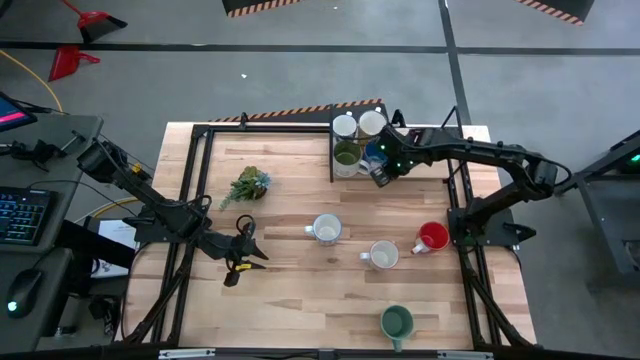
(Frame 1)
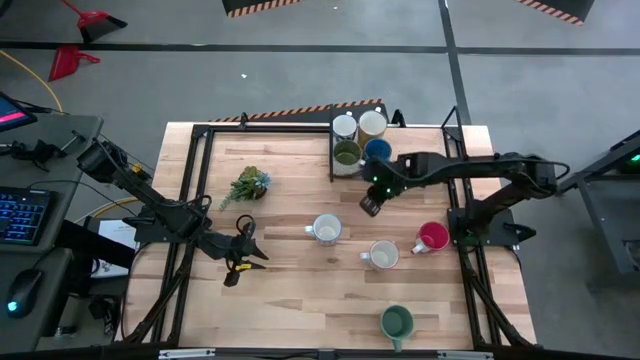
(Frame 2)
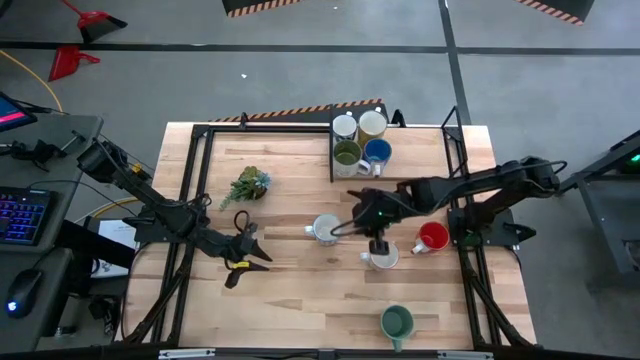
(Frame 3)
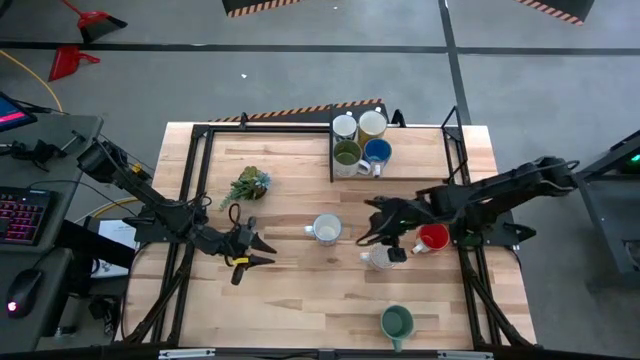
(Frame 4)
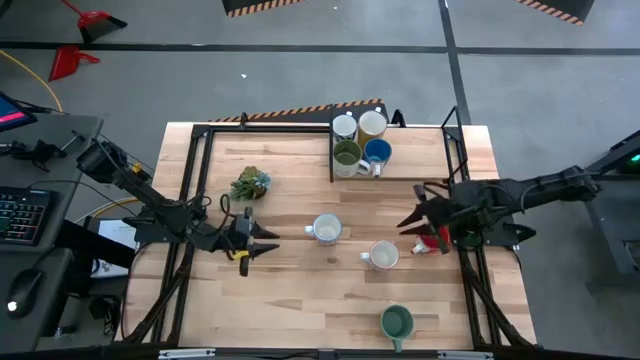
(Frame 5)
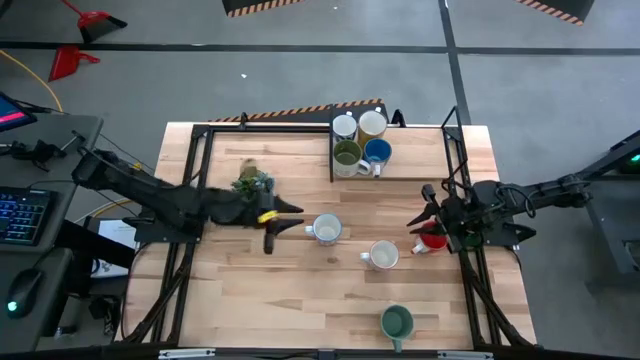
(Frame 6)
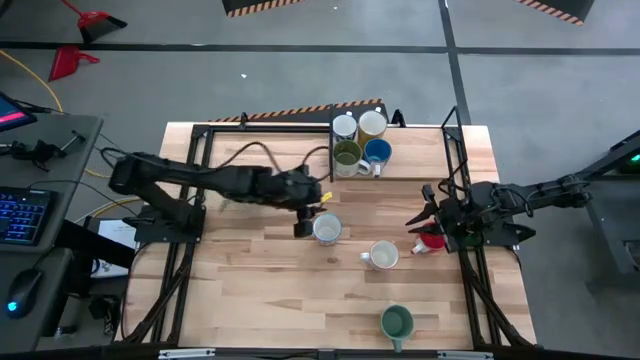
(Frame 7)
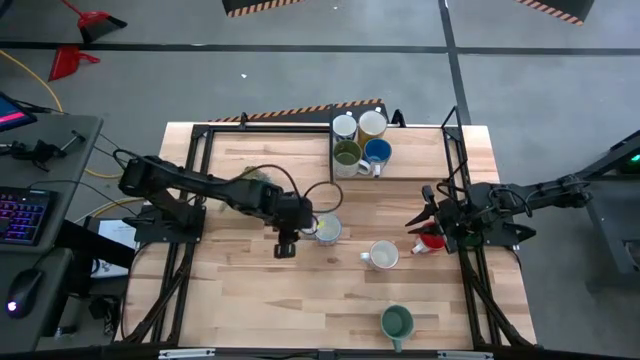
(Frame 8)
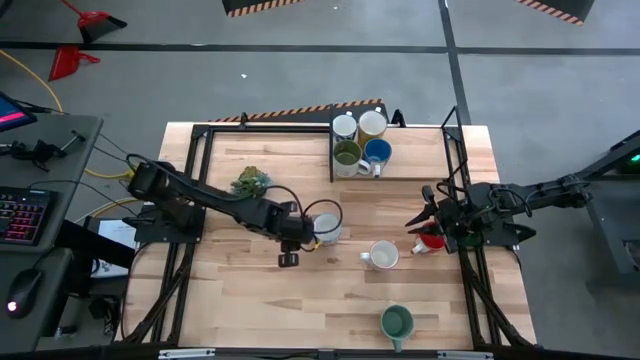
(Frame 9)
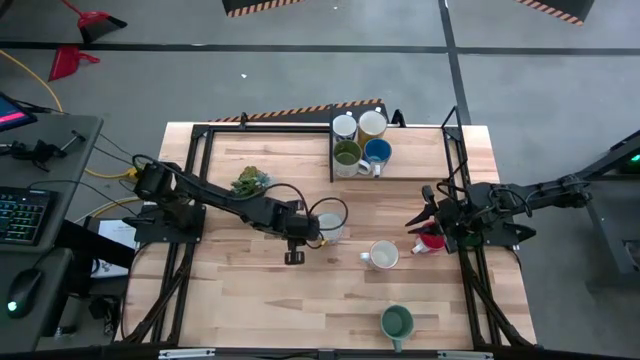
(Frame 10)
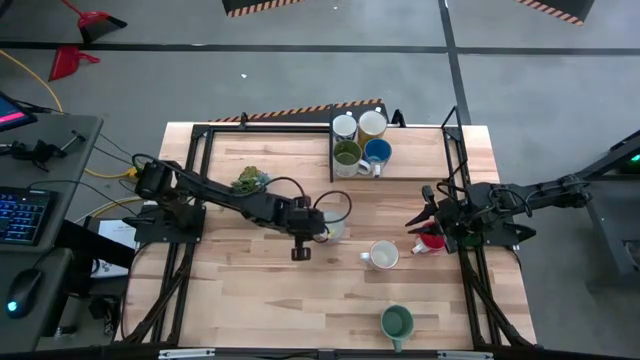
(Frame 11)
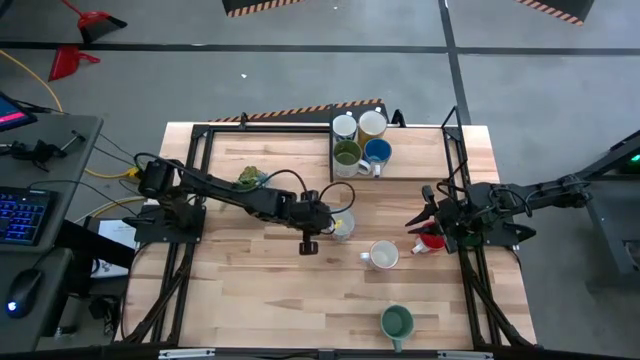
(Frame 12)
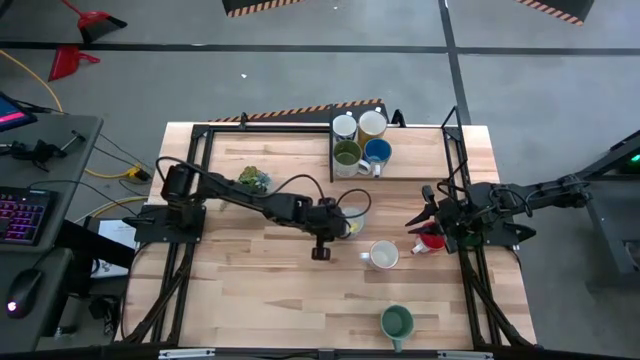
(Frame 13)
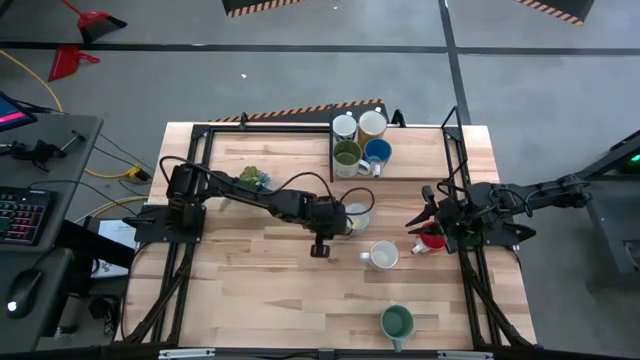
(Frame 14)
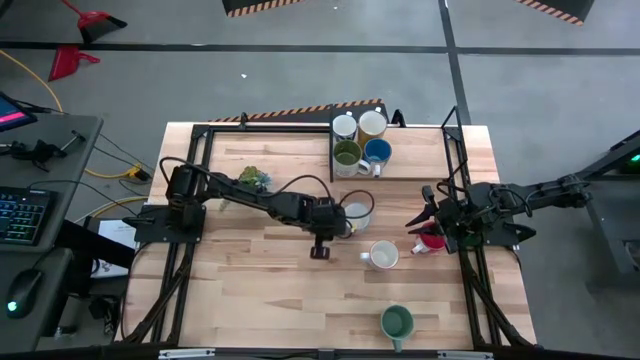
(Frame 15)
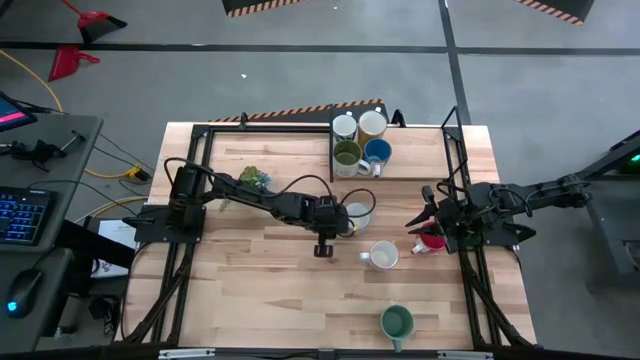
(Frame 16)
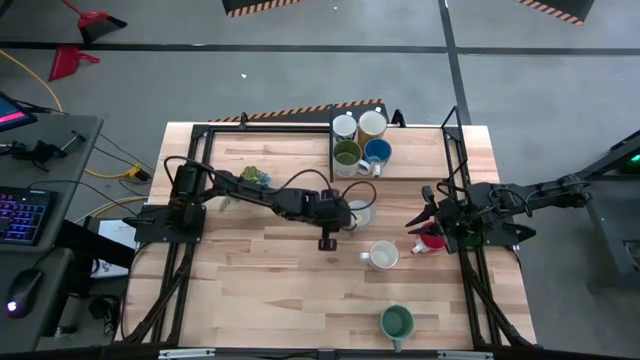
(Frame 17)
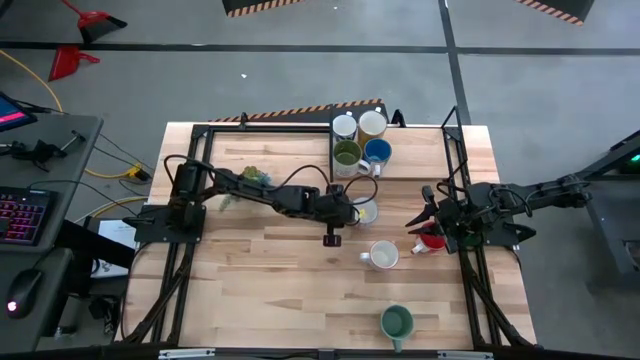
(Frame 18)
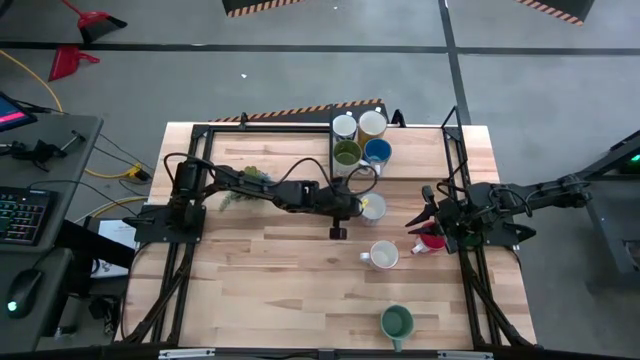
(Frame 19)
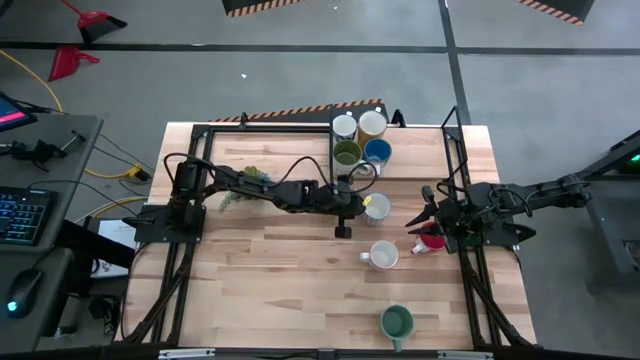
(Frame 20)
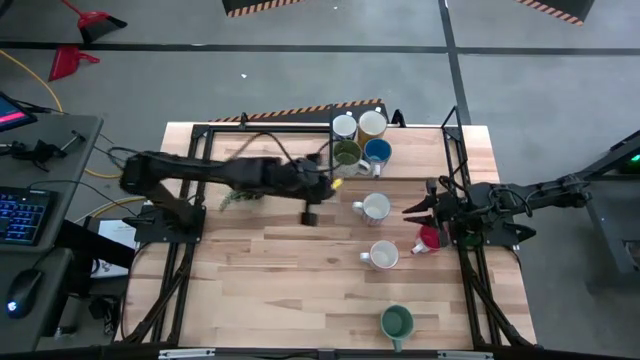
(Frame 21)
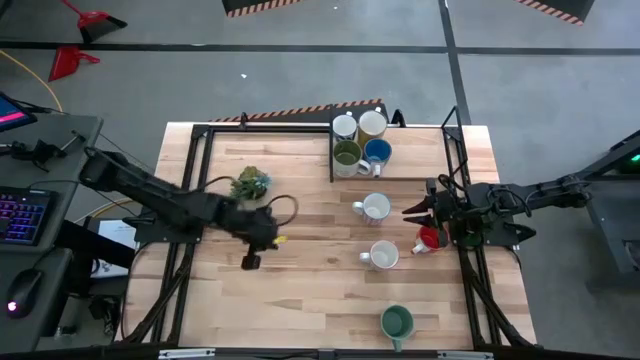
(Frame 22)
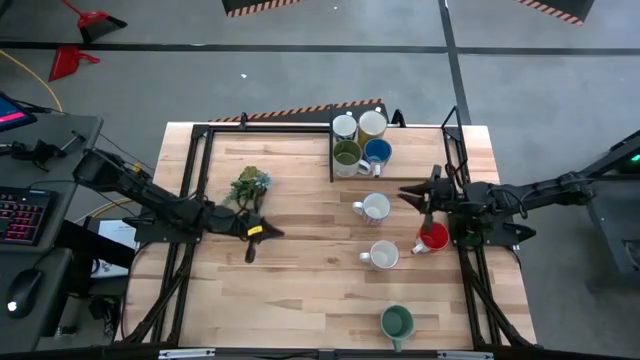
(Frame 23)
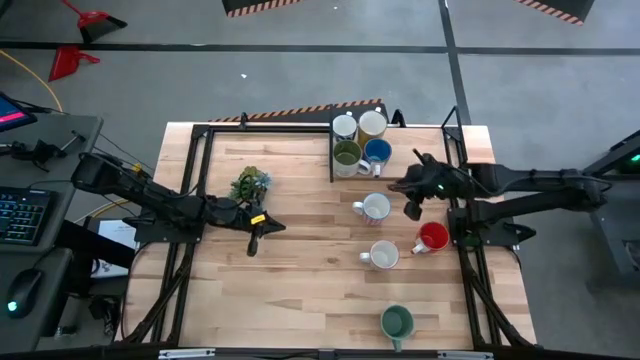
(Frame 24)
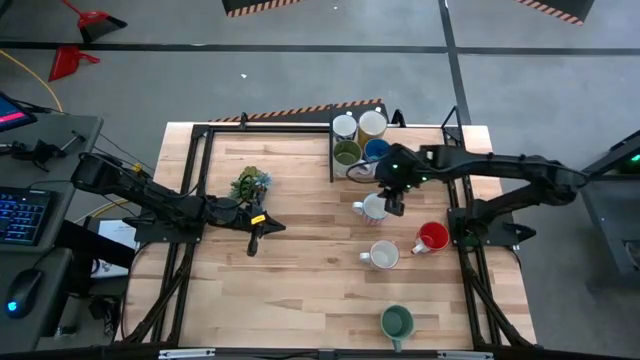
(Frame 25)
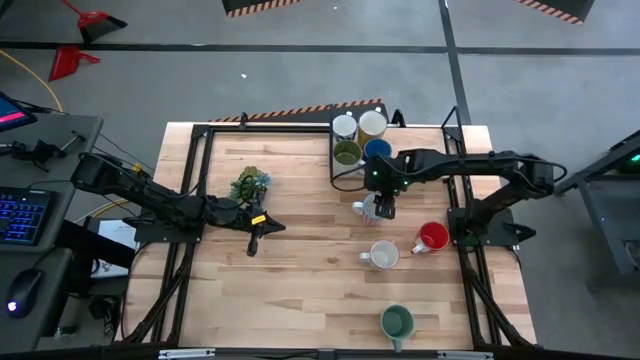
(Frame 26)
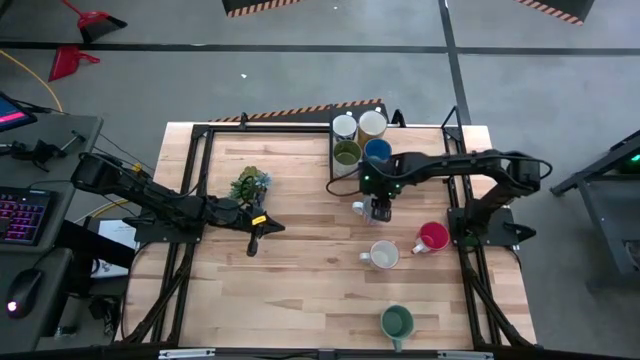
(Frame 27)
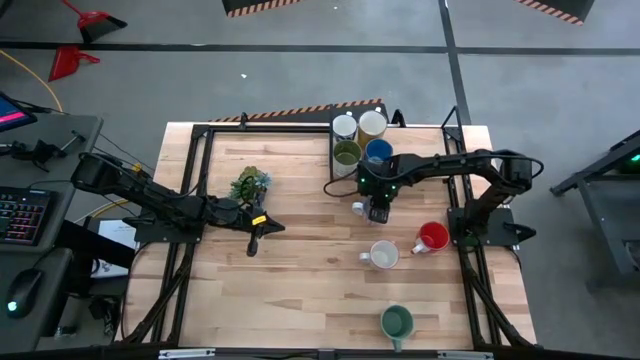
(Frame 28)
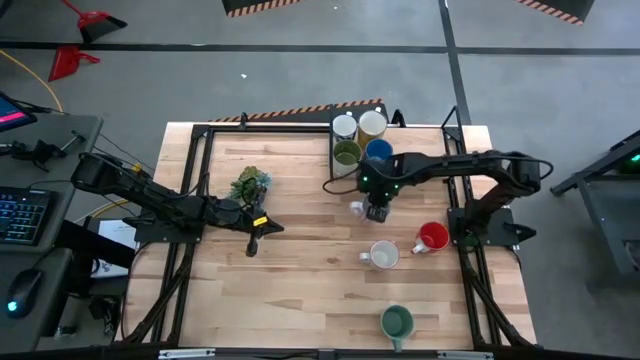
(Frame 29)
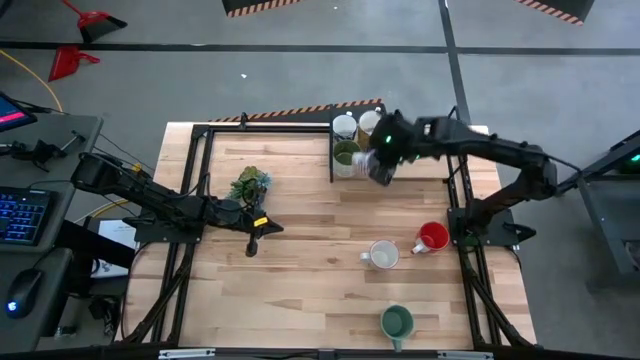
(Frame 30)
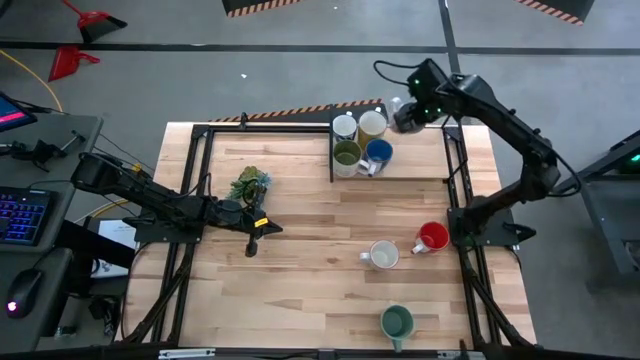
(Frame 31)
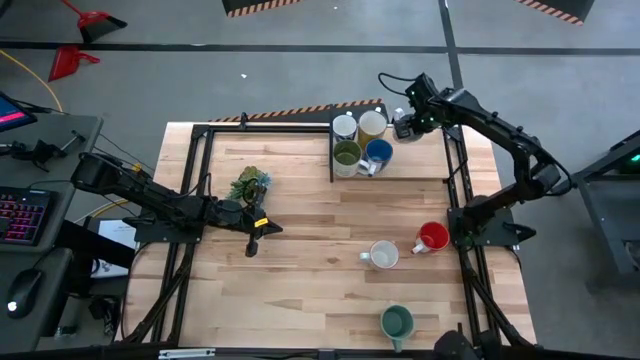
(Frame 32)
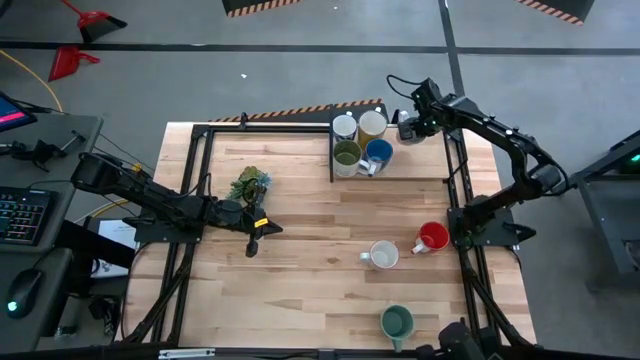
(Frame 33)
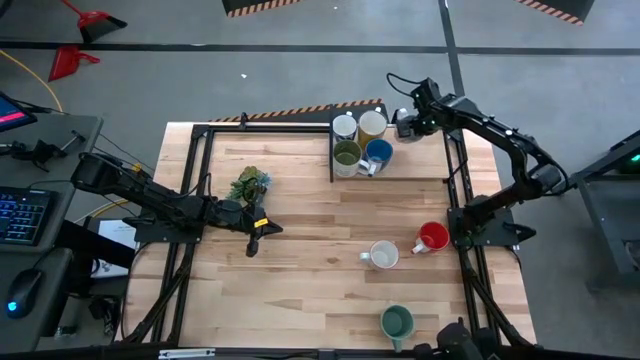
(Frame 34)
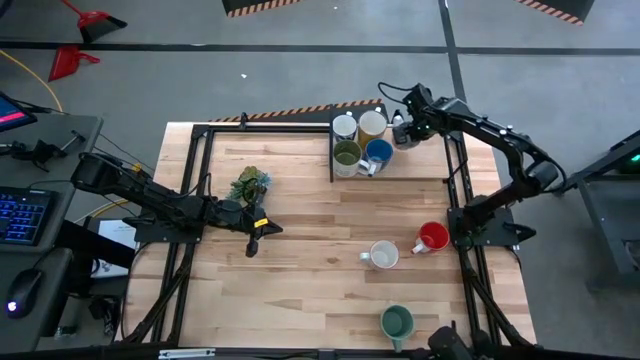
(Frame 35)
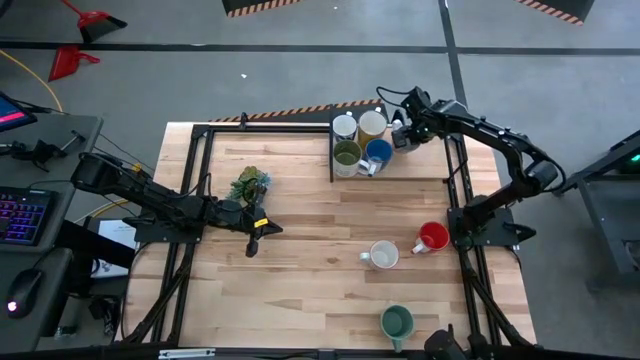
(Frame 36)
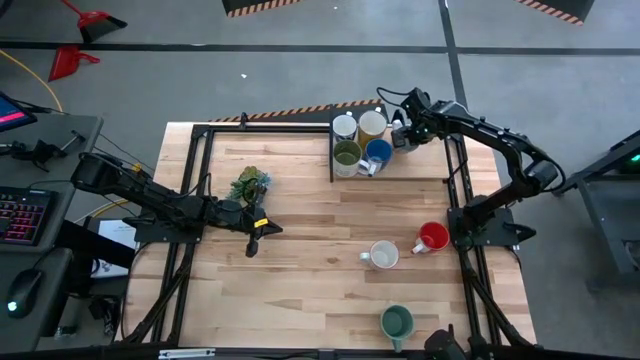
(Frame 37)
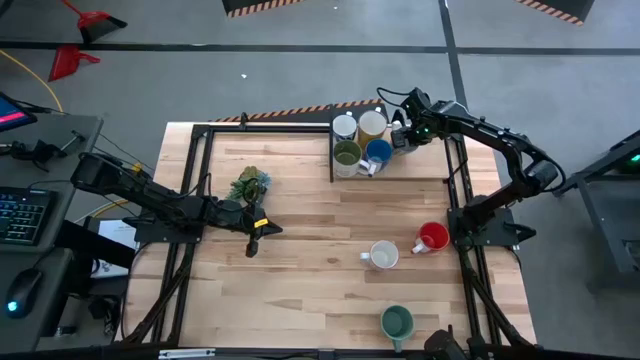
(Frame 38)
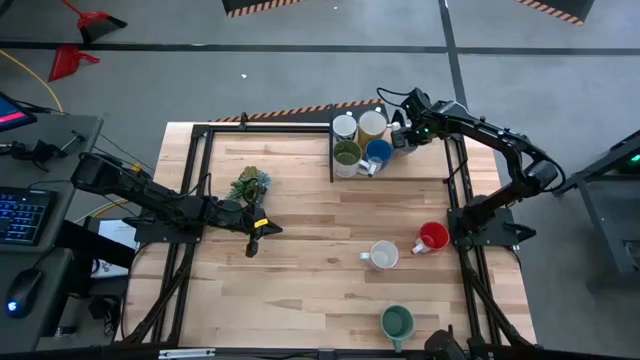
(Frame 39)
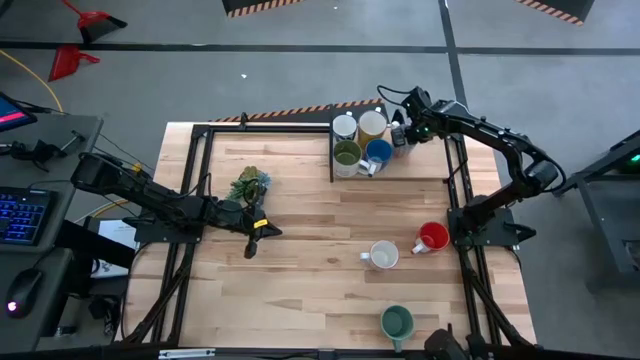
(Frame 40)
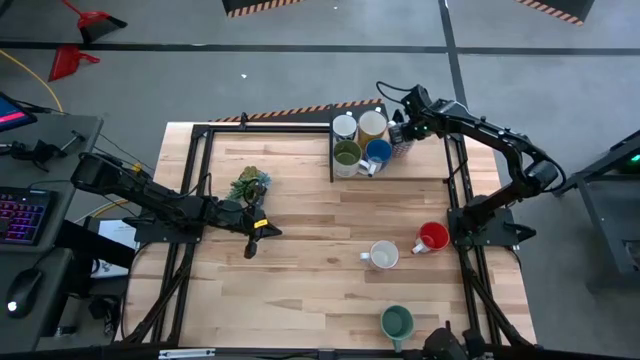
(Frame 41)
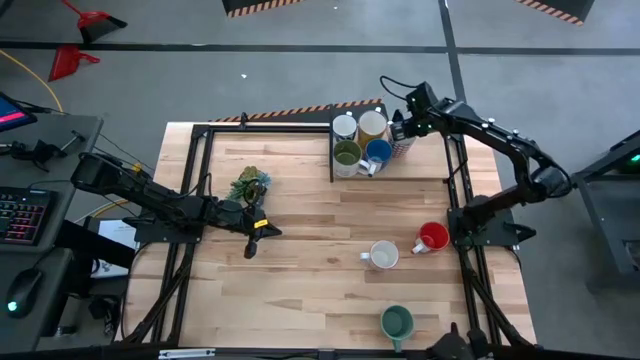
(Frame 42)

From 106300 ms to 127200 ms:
Task: Place coffee mugs
Put the white red mug on the shelf
